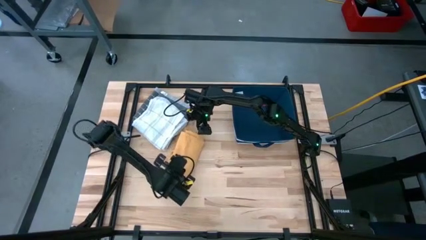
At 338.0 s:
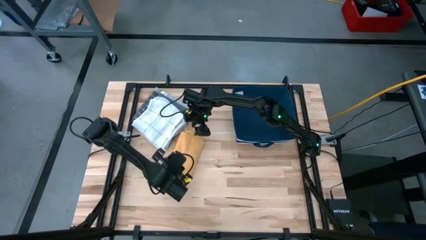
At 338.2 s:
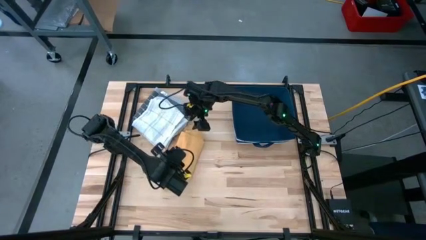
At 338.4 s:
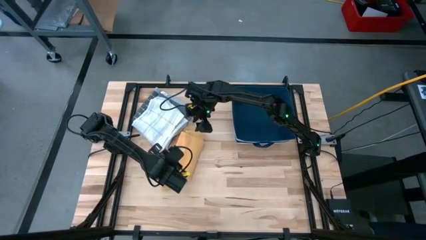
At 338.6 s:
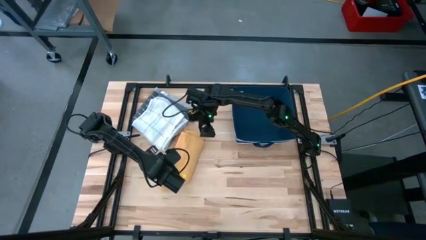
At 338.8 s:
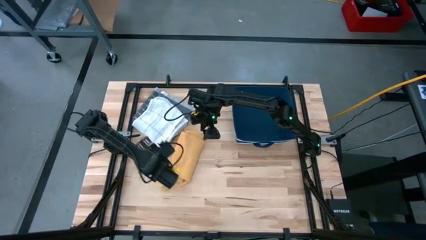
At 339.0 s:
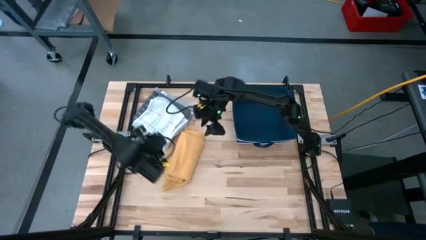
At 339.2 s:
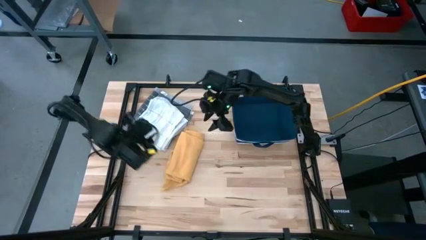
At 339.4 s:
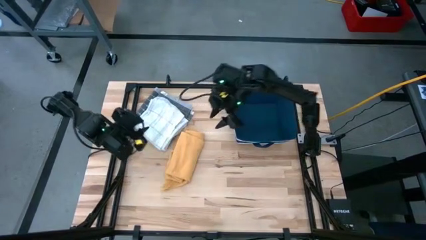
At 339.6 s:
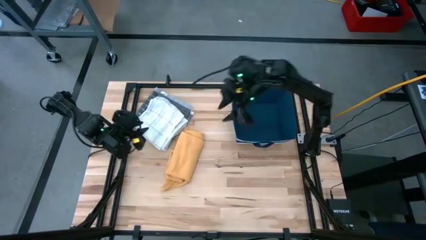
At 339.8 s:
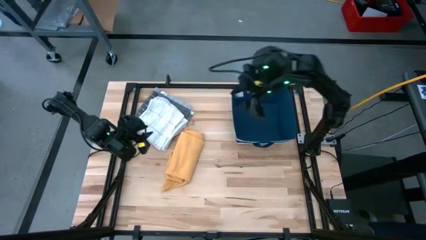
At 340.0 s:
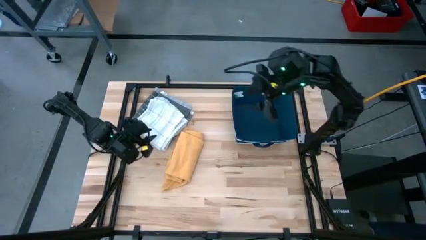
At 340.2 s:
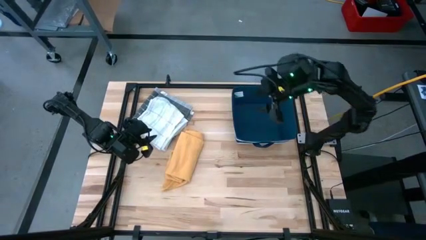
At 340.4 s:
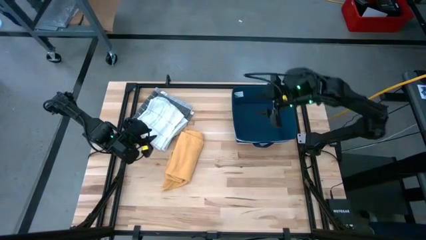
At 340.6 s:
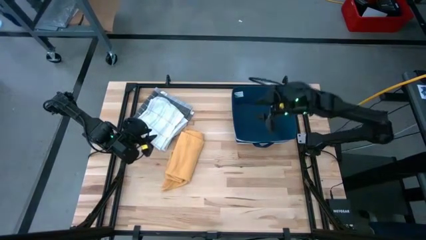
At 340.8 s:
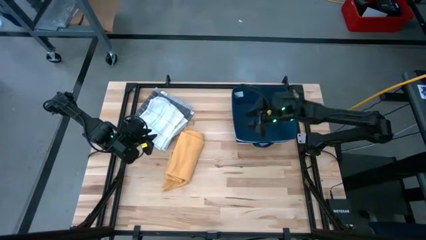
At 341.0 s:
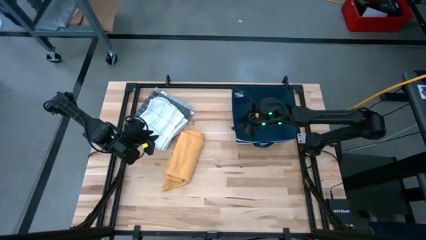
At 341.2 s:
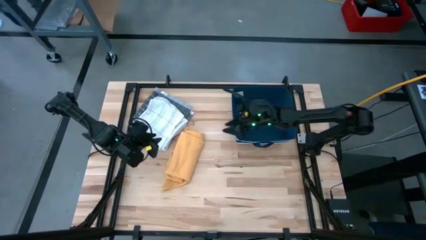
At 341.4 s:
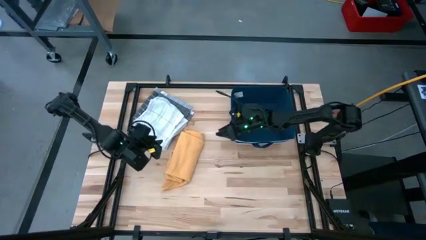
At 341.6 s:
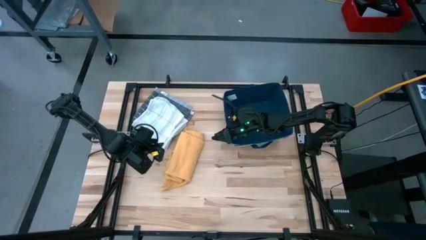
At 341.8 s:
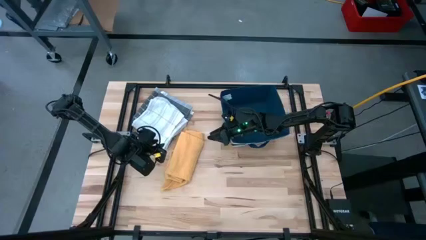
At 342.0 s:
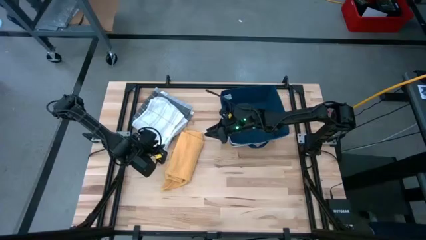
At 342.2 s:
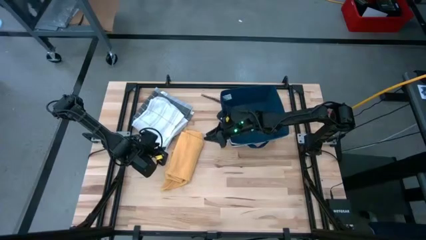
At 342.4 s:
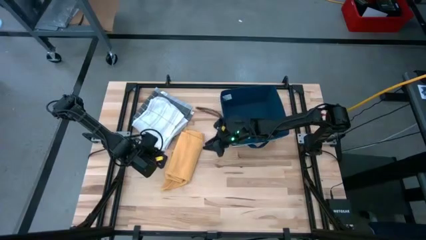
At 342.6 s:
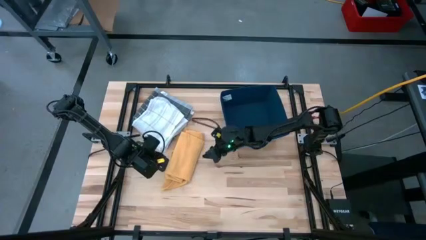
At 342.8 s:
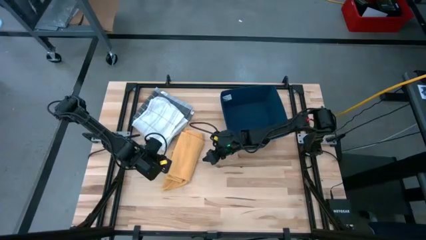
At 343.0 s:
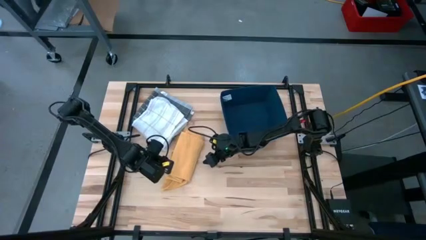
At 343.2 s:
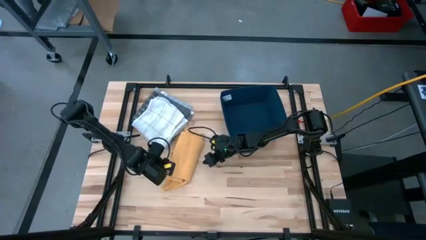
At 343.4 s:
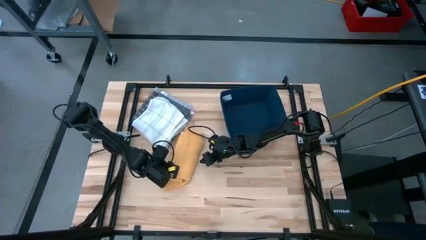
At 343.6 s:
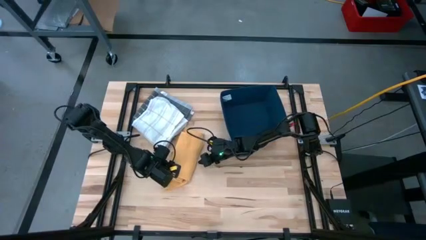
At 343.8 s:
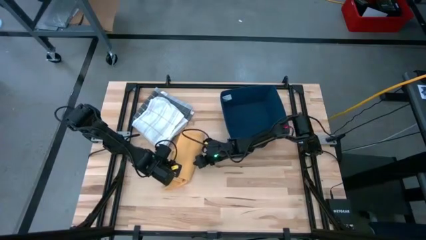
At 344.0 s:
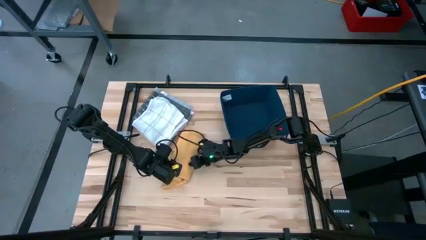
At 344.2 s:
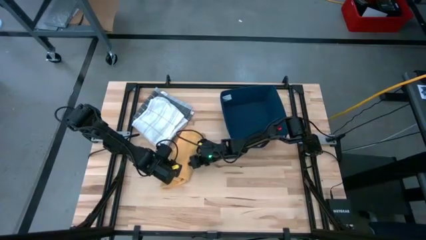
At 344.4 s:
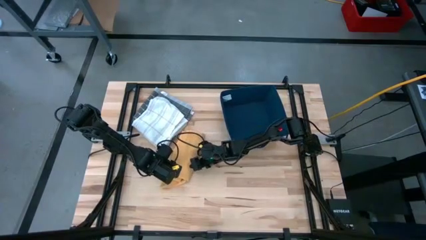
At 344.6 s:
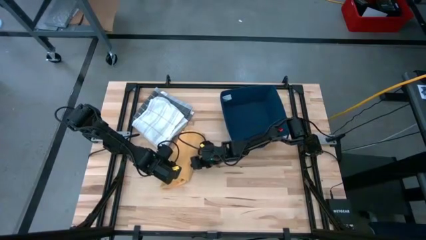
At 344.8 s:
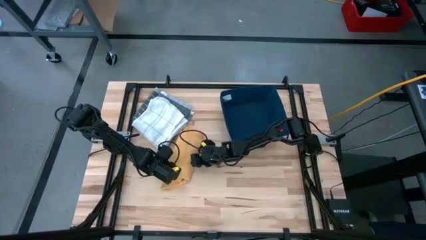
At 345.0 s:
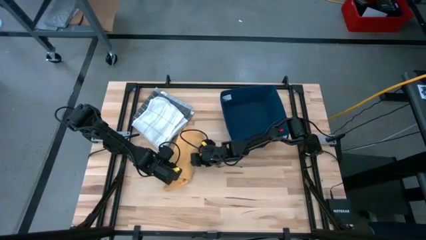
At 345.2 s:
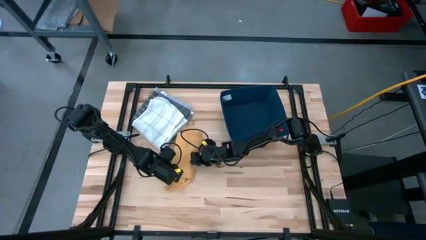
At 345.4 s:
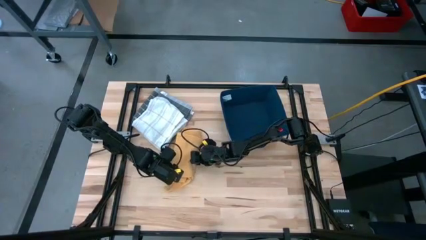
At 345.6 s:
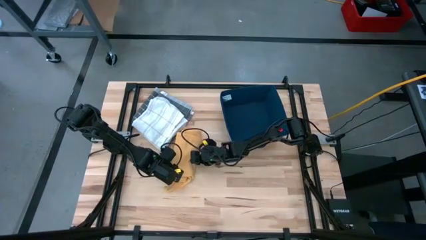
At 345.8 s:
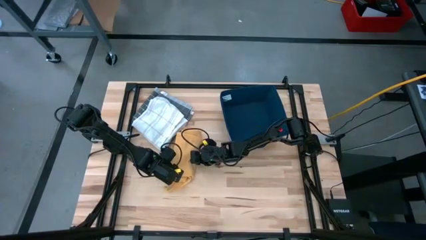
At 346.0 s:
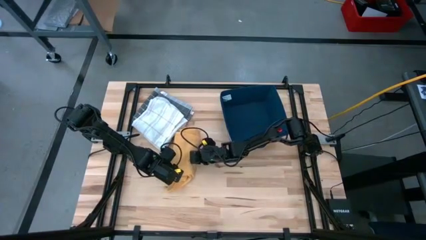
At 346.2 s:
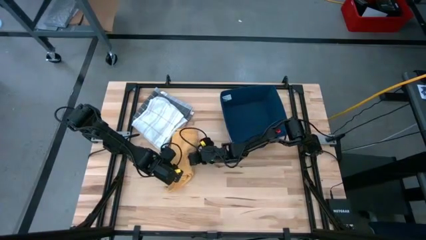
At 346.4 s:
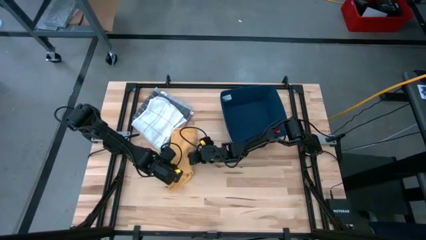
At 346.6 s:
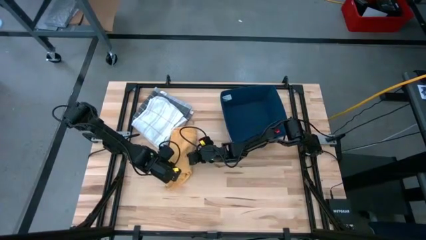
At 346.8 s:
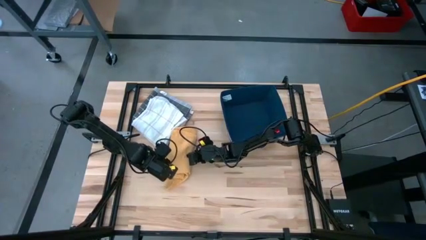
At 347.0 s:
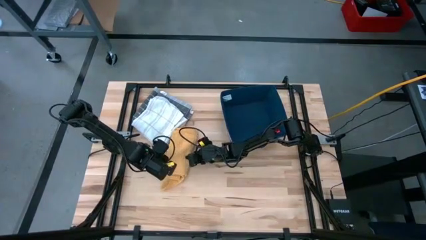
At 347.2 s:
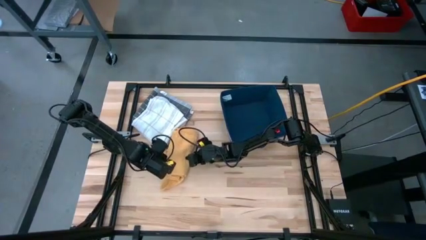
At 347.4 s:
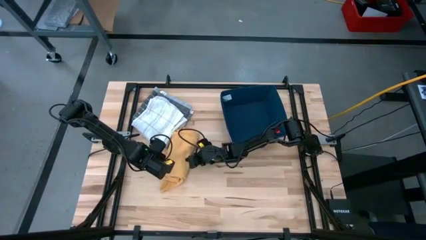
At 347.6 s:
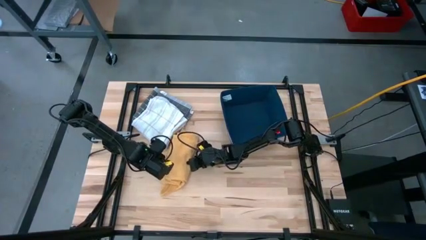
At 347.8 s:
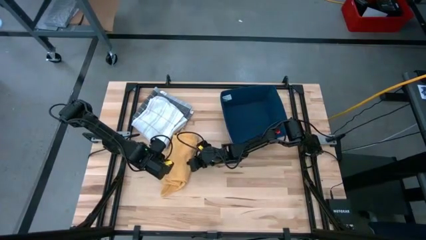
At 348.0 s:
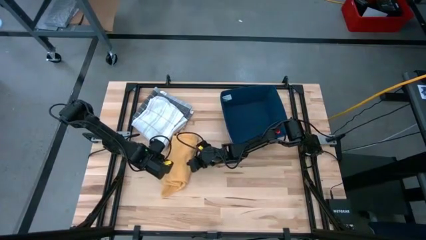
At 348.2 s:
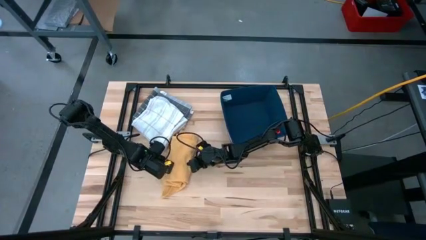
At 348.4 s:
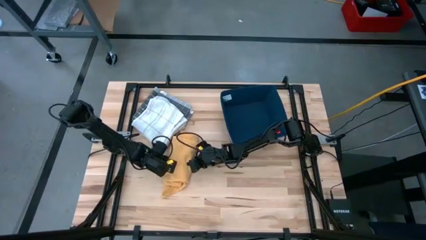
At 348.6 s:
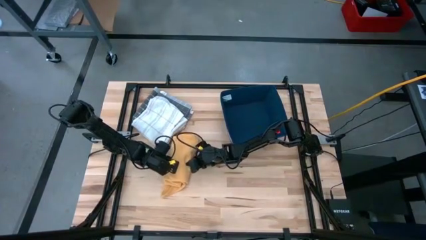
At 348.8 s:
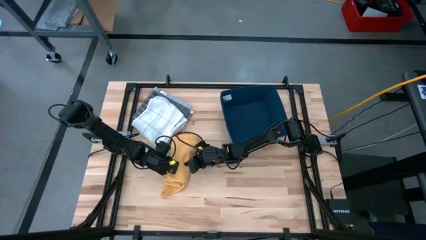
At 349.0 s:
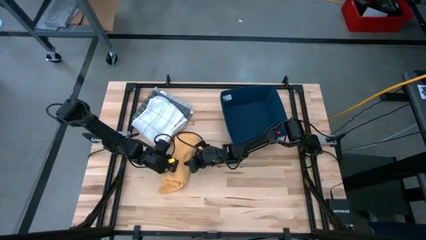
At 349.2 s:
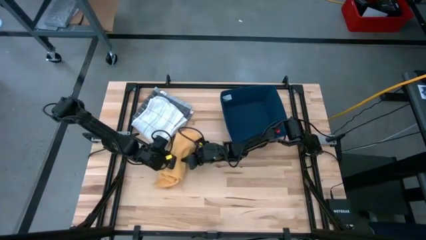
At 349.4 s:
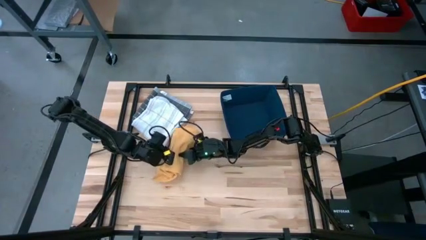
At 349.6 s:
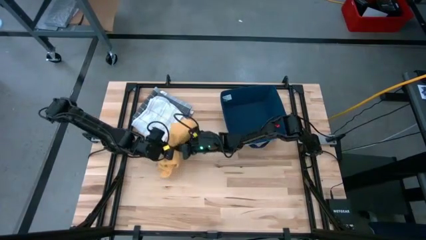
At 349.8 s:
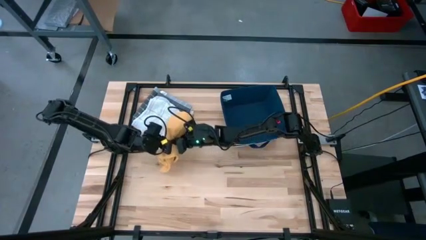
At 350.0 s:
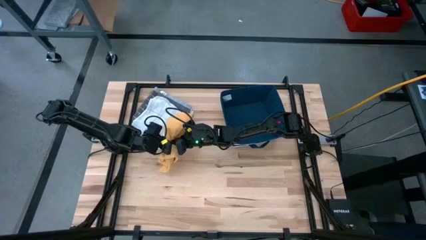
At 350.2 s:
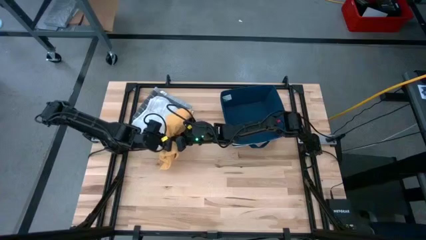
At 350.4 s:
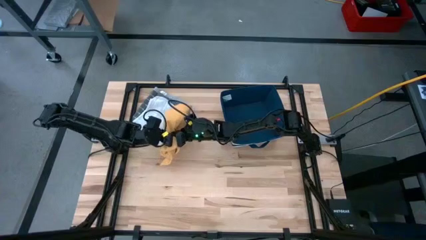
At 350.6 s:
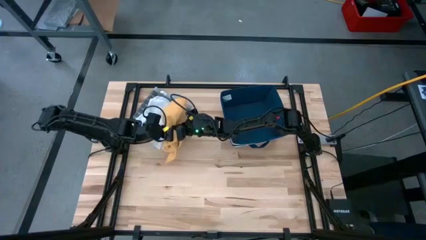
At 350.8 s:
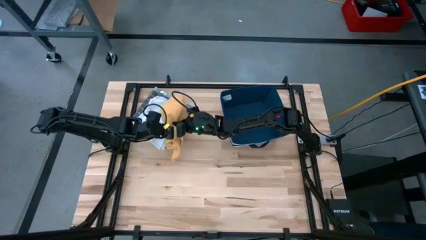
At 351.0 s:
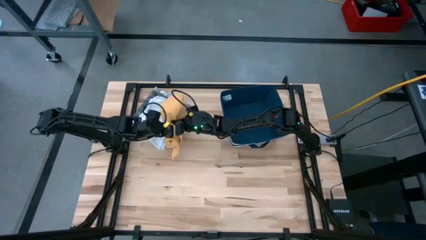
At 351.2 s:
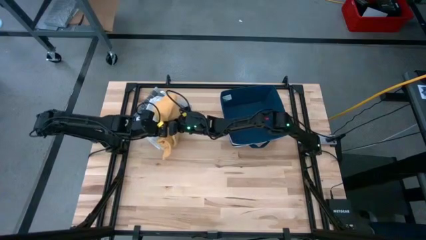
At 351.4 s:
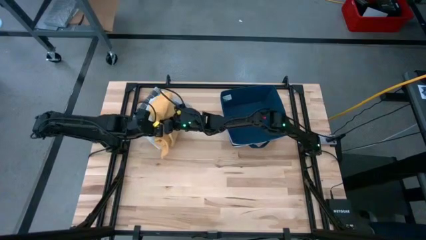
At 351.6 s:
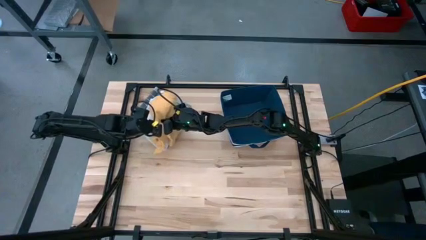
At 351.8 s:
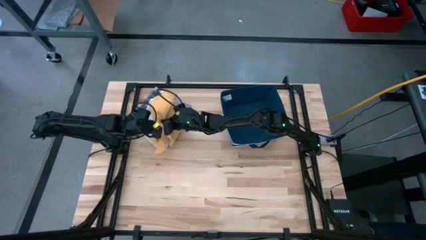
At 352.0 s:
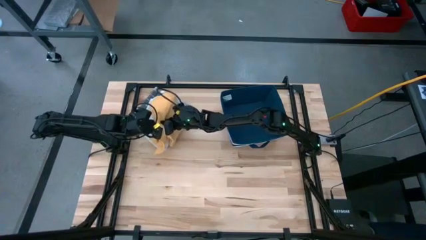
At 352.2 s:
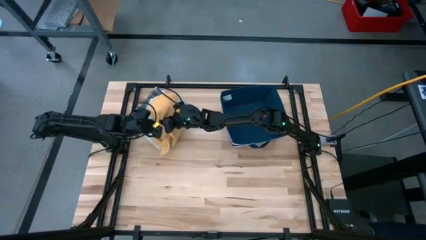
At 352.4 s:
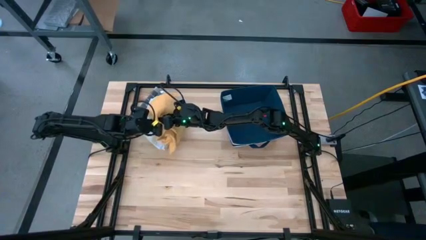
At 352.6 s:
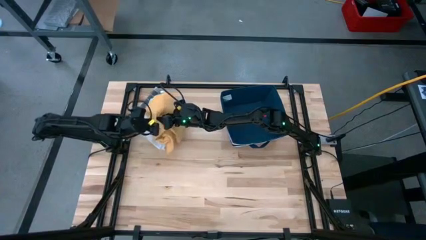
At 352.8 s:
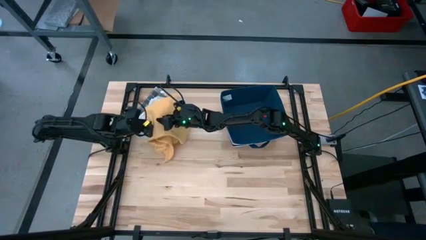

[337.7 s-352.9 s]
Task: Fold towel
Stack the yellow towel on top of the white towel

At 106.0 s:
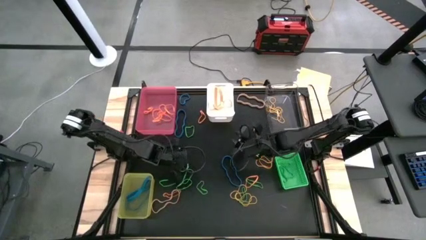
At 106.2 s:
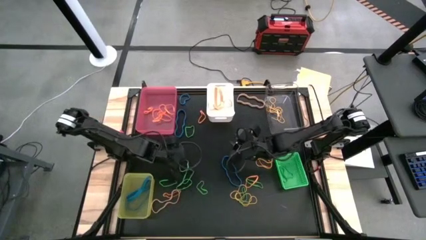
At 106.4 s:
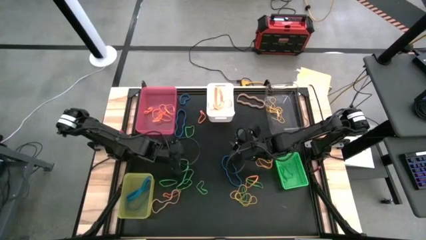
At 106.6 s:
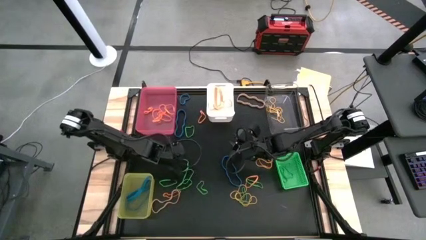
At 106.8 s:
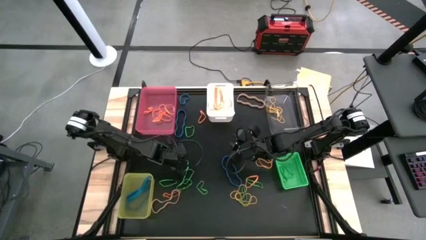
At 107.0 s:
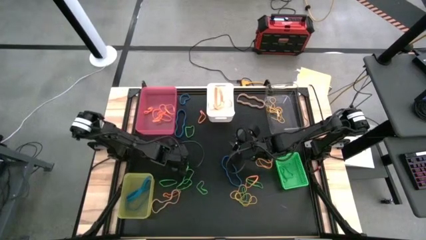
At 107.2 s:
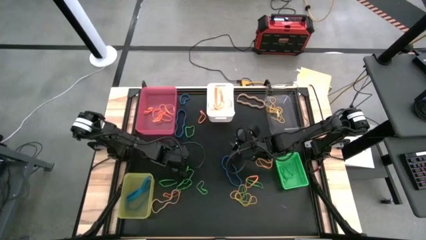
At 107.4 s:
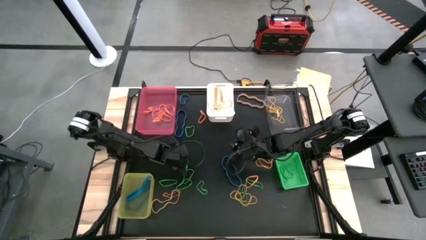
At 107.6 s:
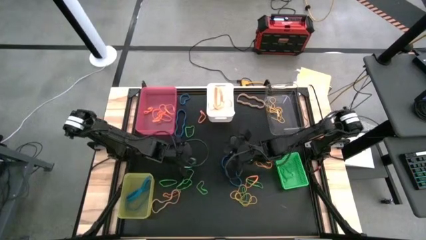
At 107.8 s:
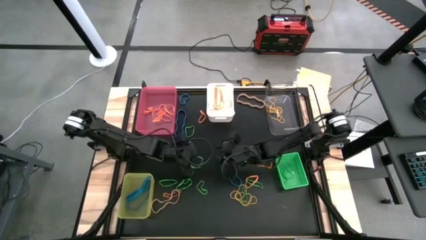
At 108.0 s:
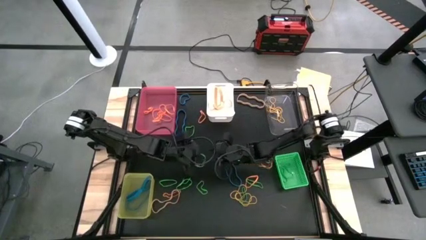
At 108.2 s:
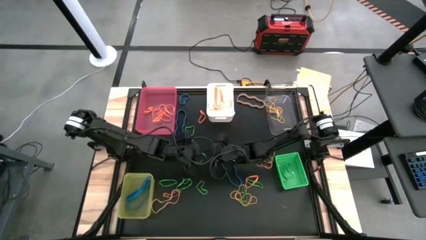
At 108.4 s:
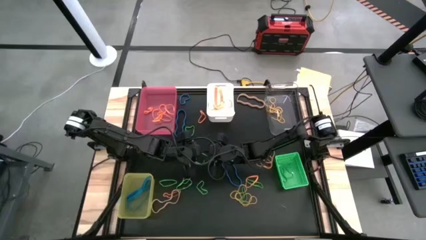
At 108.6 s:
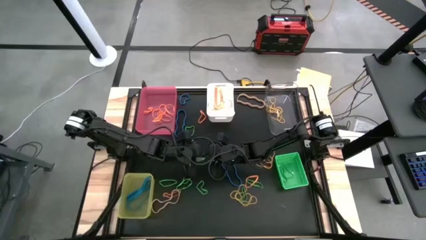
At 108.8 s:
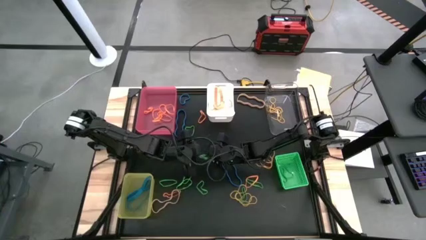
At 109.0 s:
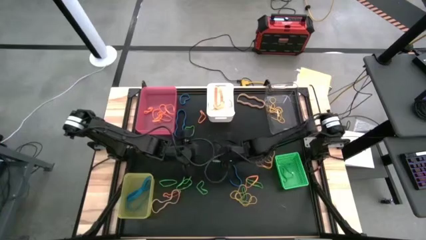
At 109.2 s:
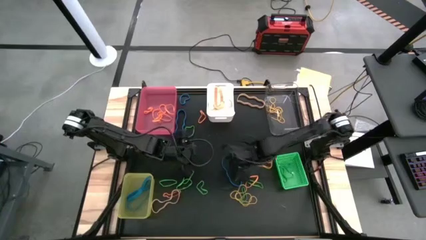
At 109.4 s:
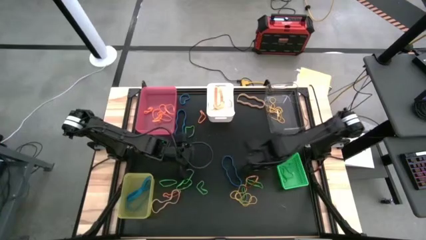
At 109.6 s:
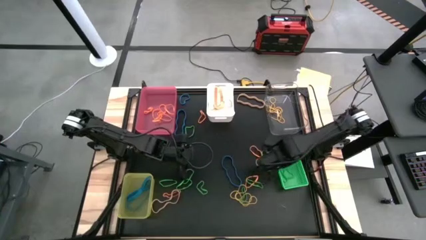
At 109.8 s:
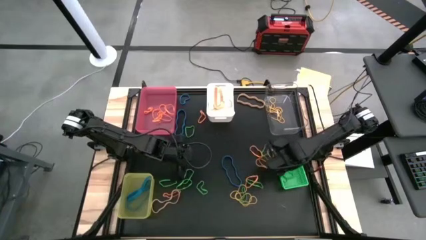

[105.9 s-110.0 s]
Task: Sort rubber bands into baskets
Put the green rubber band into the green bin
